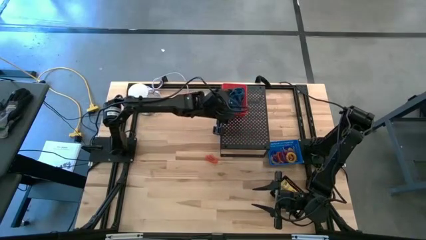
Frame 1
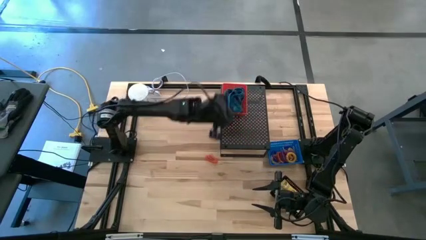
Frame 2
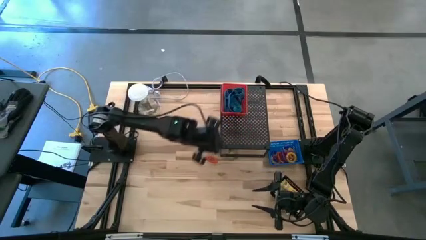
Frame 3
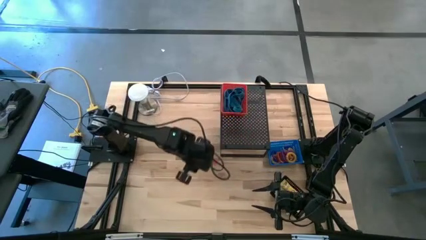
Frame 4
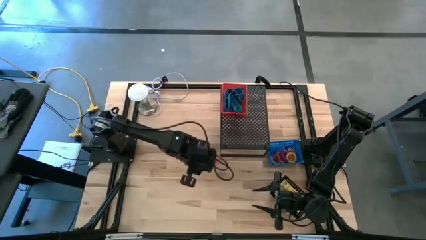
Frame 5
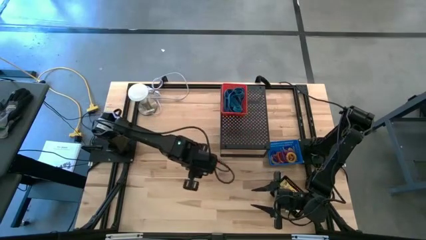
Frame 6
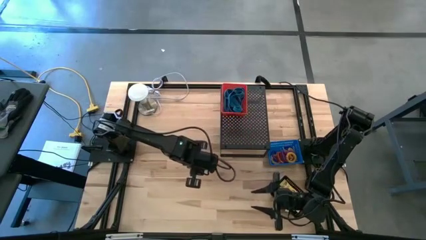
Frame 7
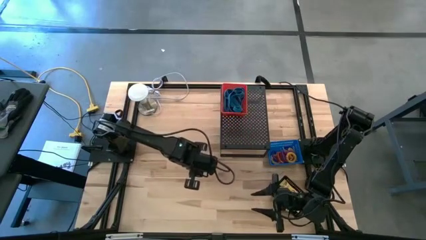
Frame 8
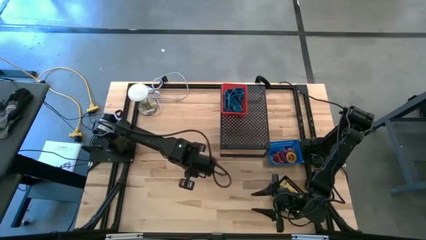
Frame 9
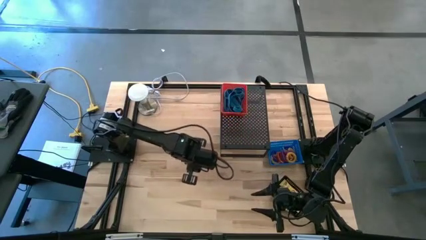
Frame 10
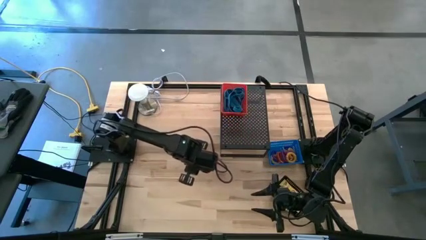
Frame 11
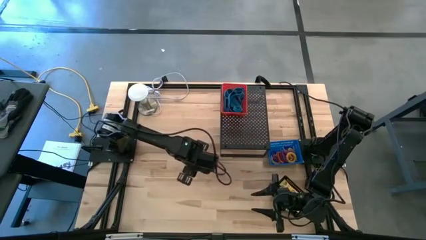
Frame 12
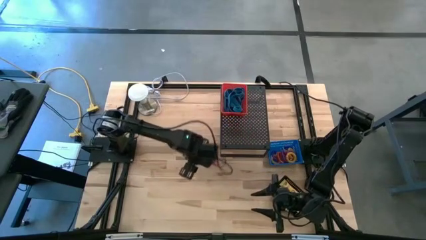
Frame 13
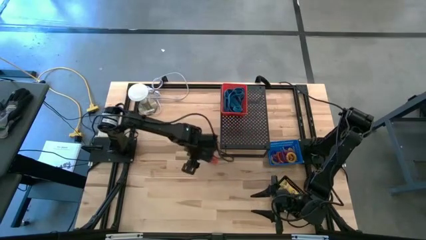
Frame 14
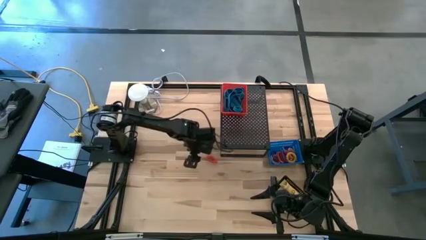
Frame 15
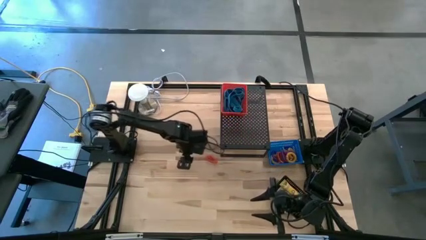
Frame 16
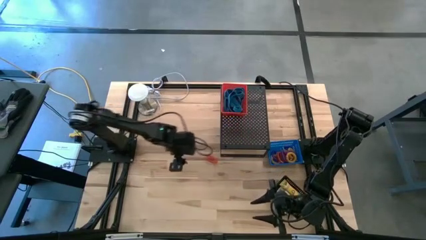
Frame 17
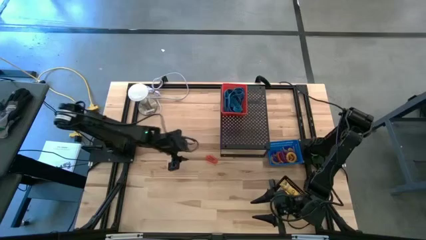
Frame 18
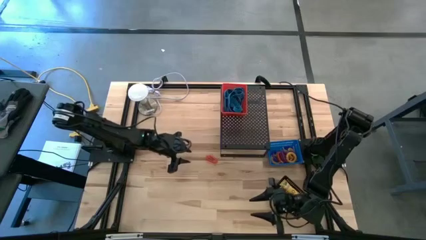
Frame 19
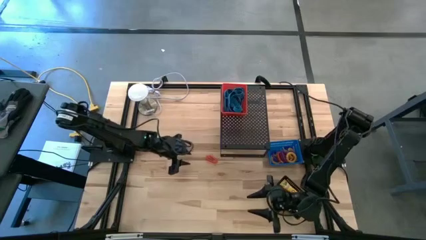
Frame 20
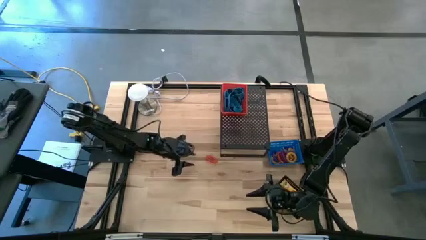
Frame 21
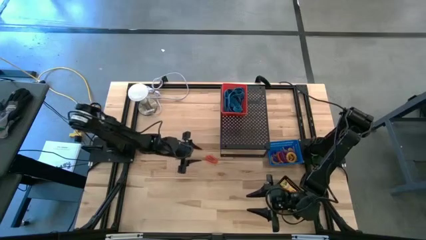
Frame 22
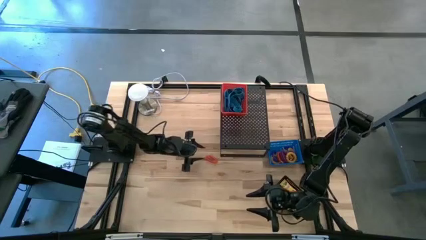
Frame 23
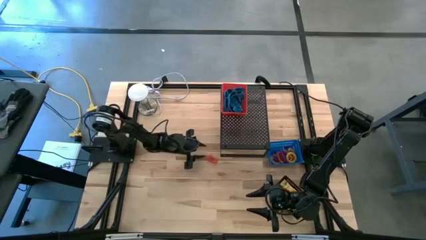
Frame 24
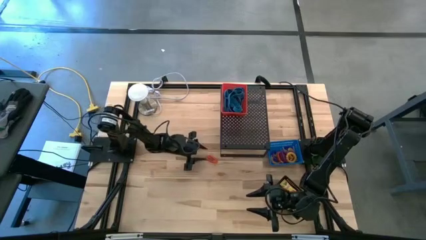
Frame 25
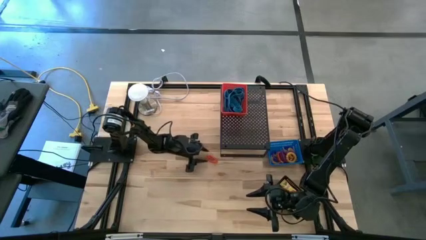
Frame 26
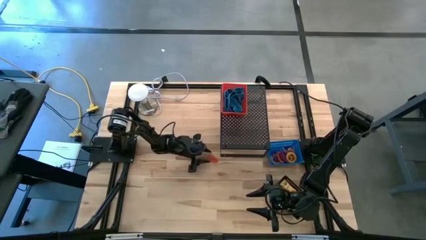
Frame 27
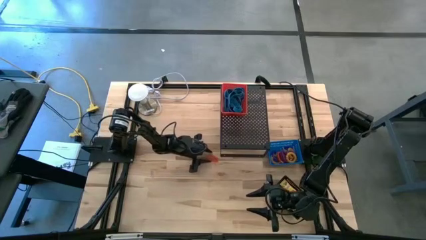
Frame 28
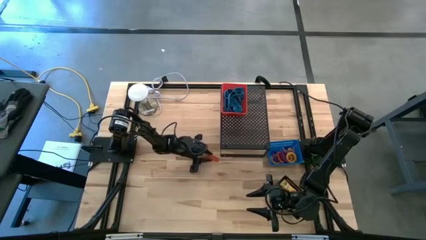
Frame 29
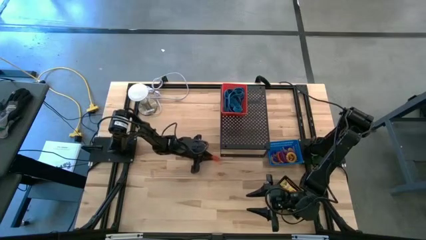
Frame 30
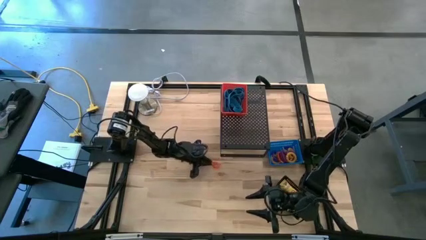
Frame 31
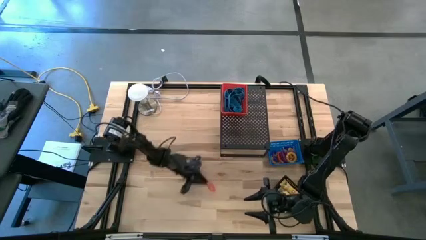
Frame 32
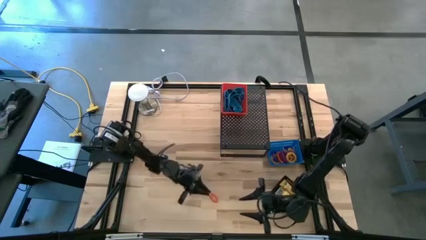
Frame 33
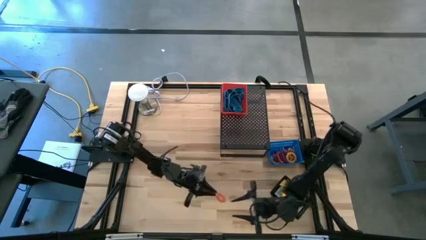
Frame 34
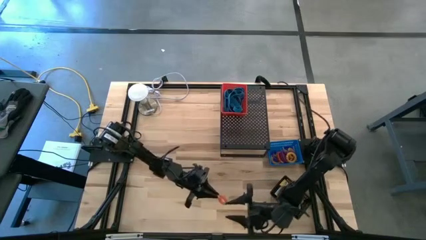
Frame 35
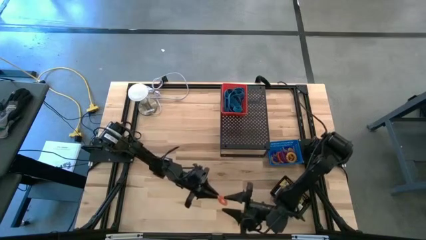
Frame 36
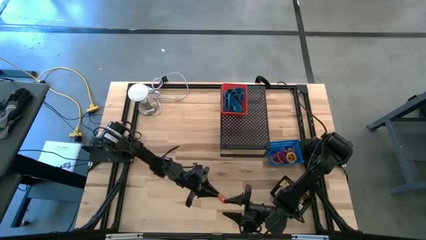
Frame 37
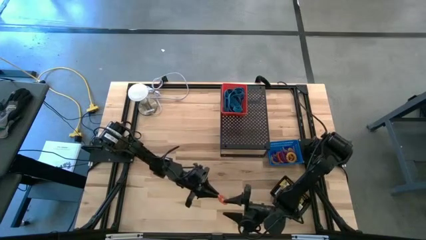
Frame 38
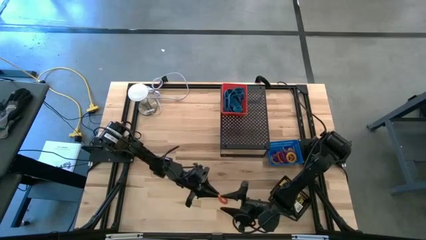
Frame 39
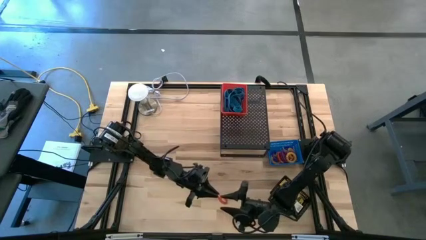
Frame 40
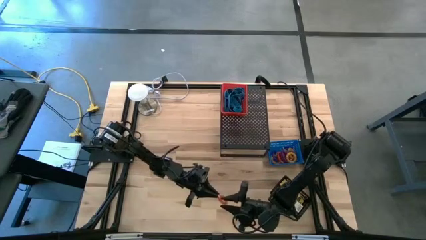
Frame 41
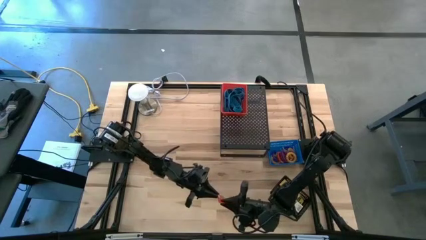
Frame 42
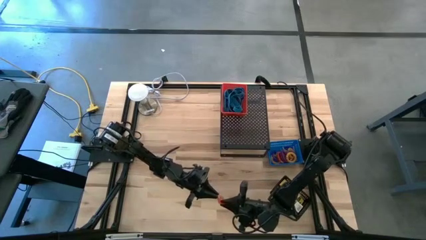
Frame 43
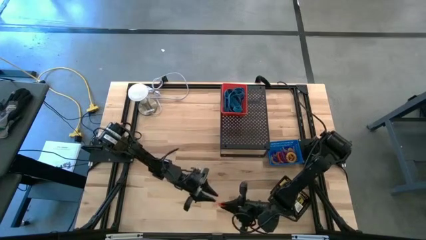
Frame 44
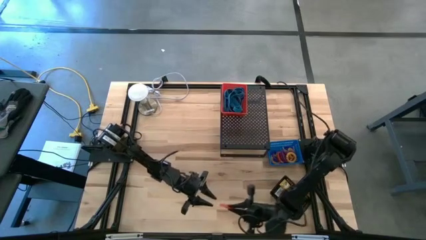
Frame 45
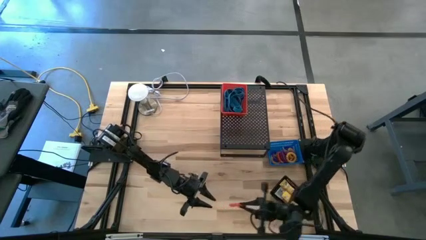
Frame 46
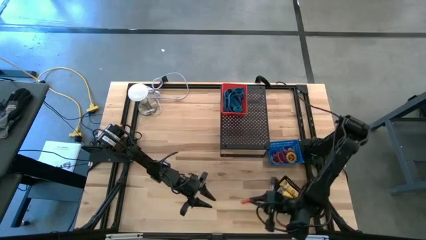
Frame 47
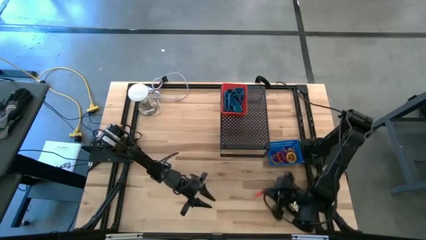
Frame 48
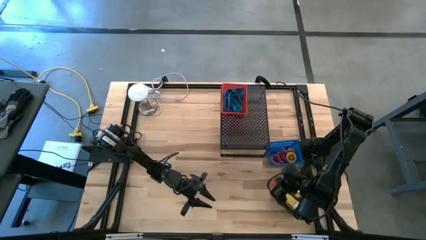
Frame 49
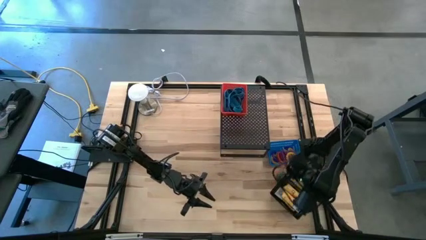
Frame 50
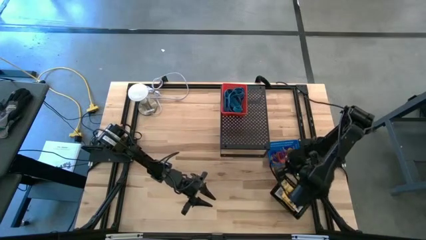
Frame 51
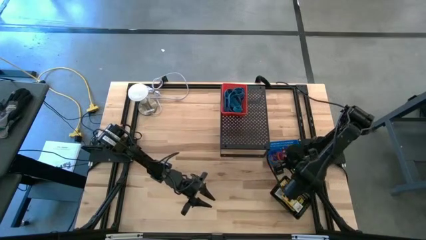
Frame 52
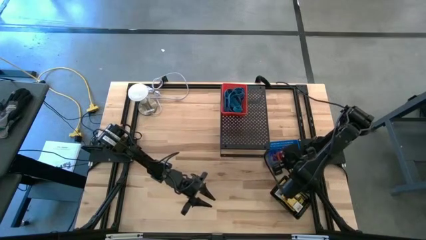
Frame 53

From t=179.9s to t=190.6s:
Task: Pick & Place Office Desk Supplies
Put the orange spring keychain into the blue basket

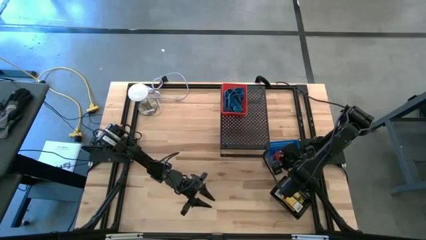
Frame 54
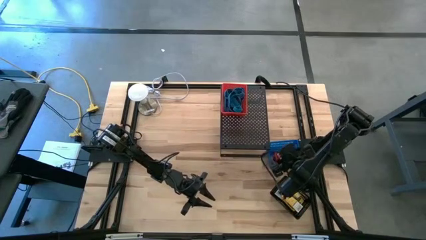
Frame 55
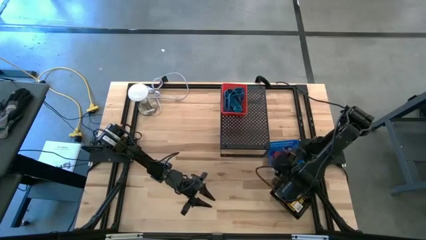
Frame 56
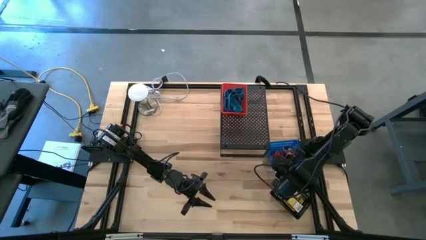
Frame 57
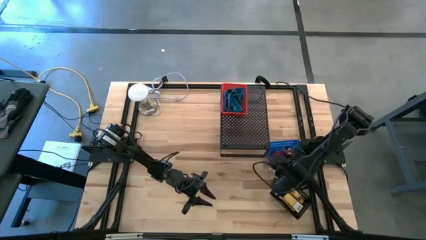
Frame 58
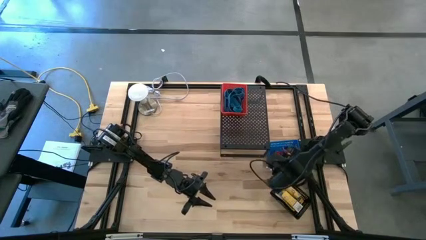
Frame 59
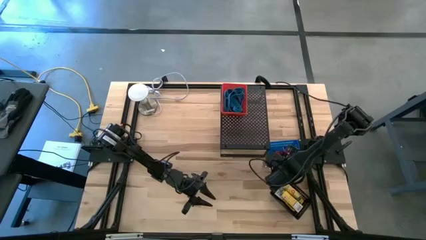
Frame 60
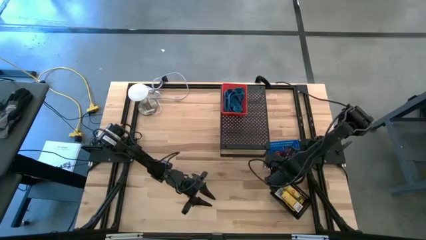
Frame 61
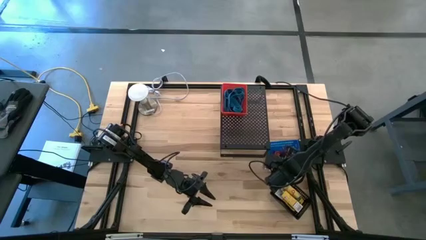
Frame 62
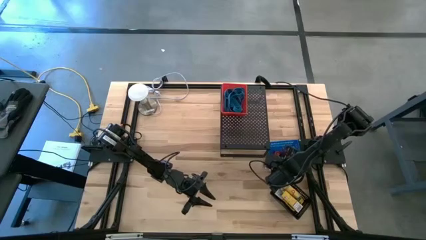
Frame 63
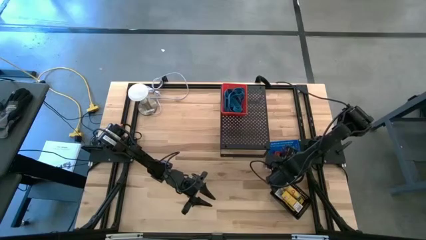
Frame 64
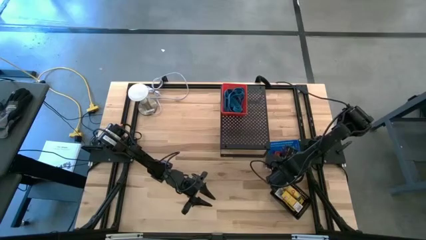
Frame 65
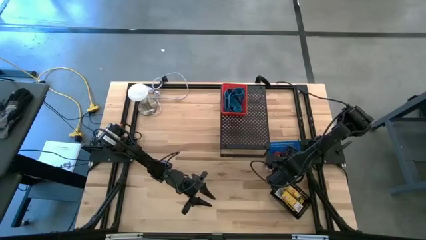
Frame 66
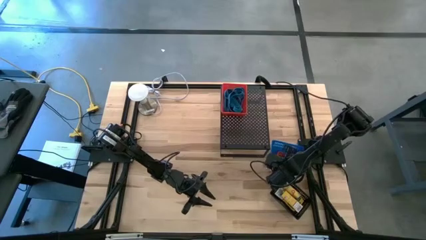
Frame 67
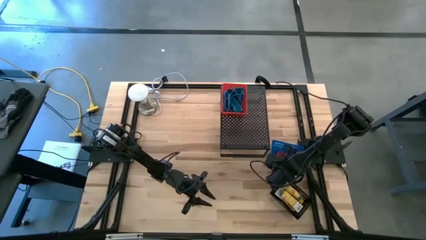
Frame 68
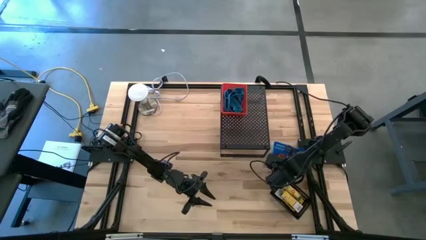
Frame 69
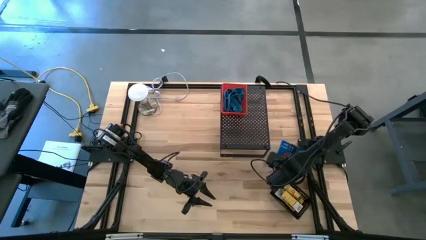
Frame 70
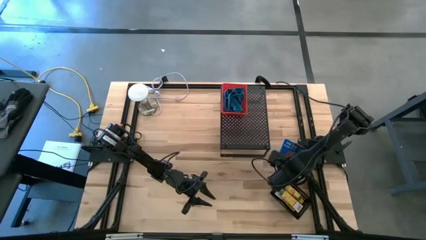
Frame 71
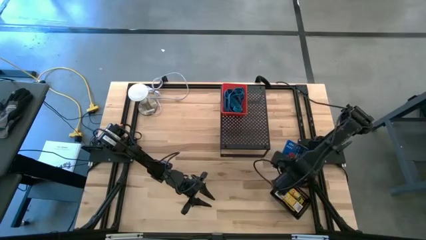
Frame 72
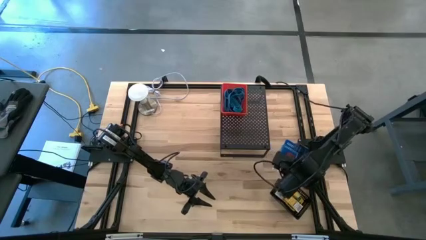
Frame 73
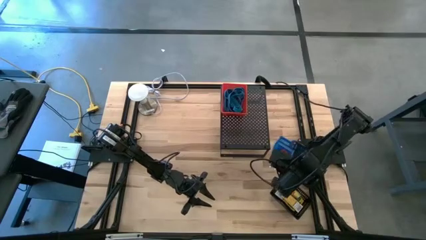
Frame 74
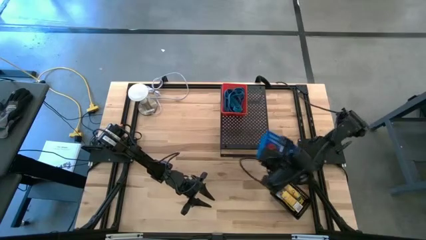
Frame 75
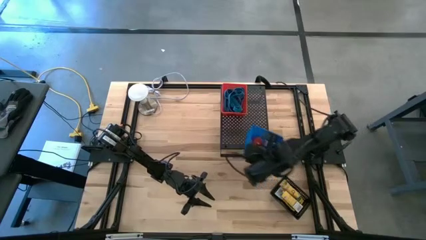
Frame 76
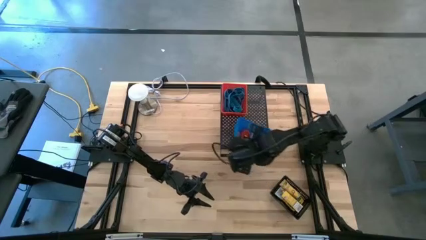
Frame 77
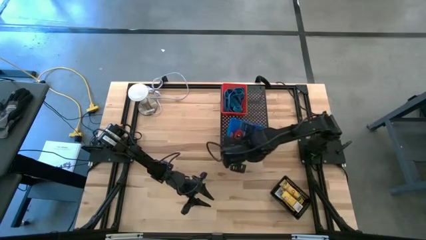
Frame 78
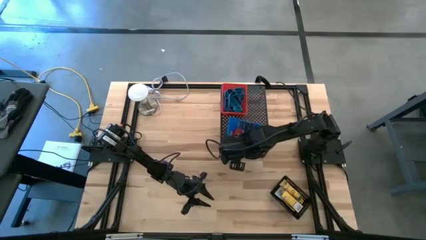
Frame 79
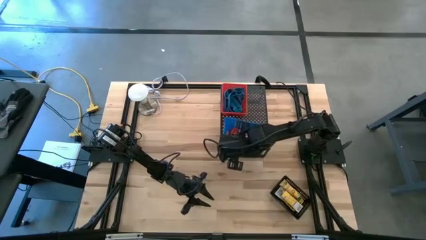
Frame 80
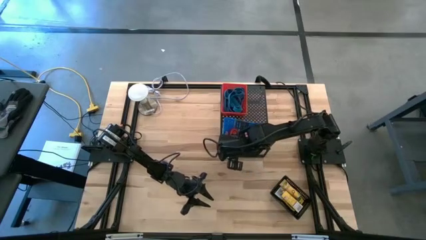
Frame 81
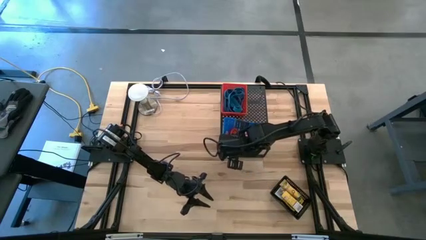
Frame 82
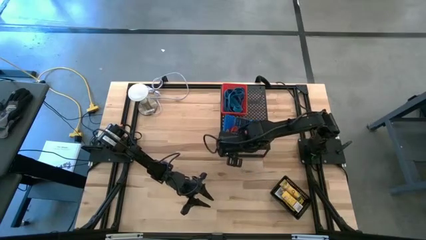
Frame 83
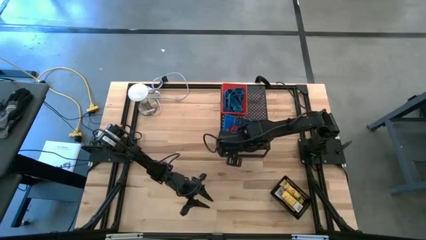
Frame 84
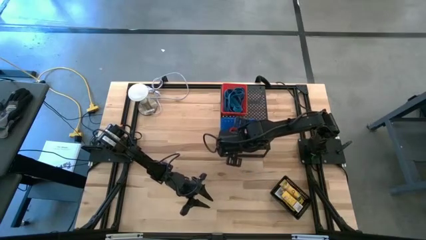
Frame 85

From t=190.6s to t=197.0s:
Put the blue basket on the shelf
